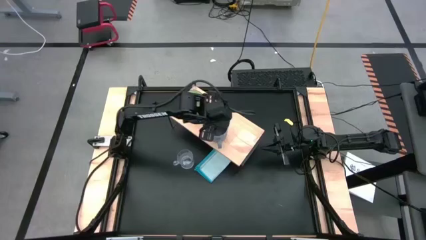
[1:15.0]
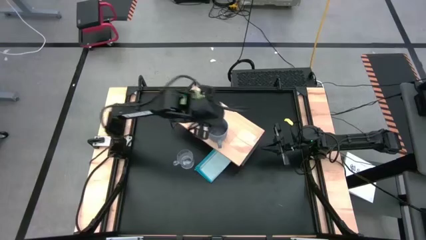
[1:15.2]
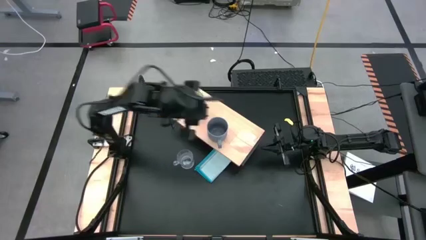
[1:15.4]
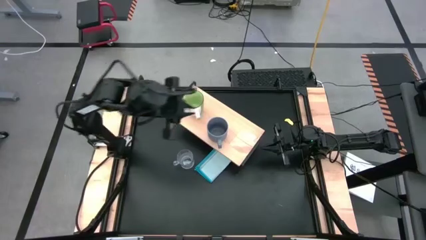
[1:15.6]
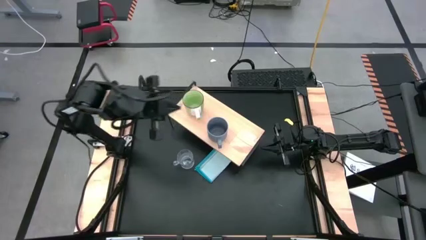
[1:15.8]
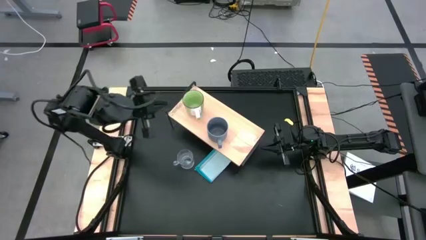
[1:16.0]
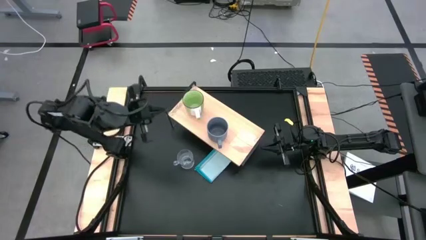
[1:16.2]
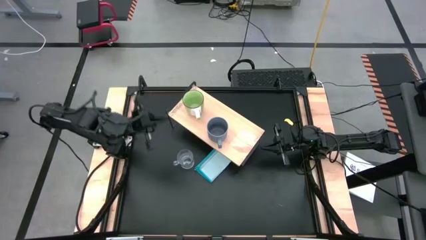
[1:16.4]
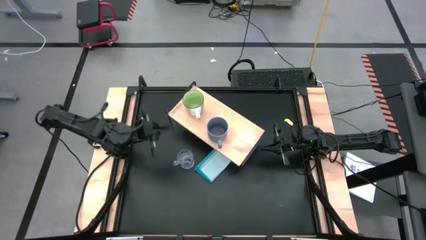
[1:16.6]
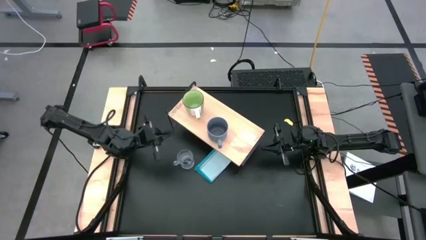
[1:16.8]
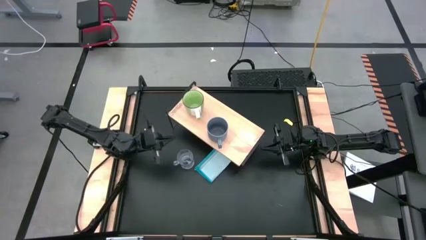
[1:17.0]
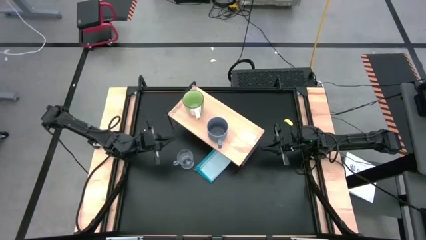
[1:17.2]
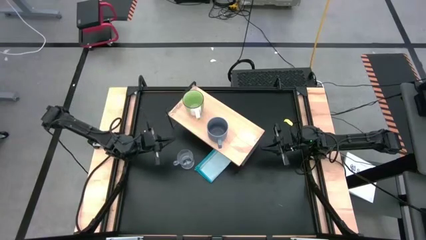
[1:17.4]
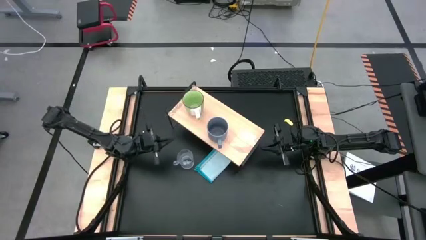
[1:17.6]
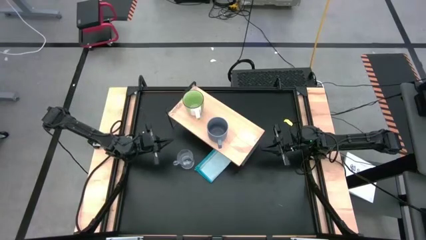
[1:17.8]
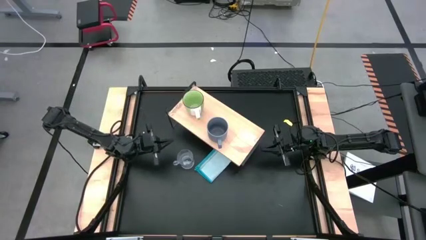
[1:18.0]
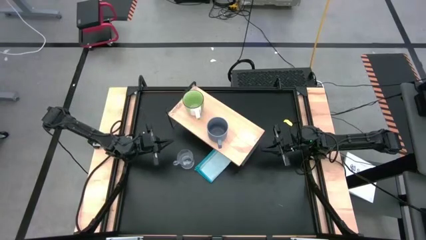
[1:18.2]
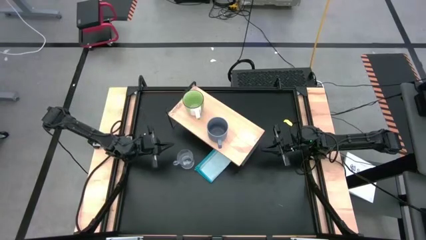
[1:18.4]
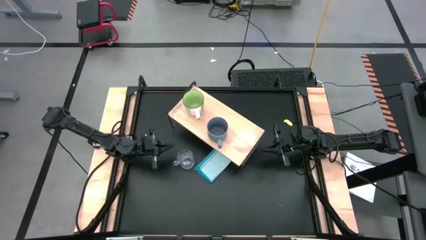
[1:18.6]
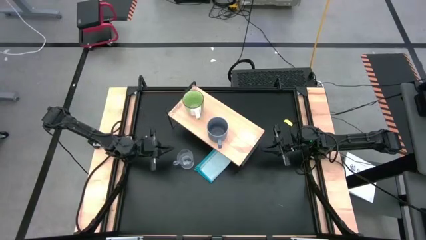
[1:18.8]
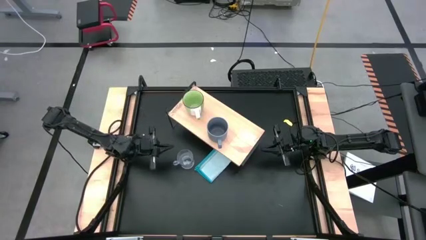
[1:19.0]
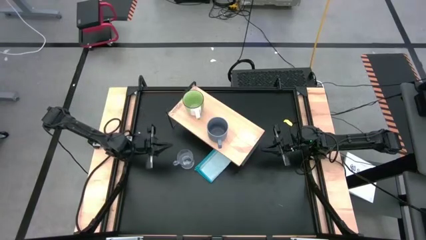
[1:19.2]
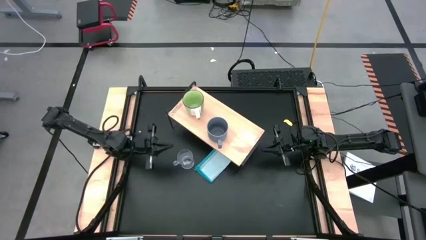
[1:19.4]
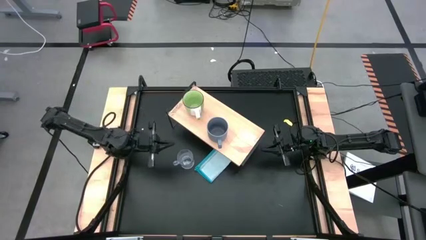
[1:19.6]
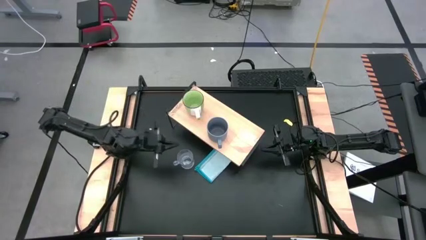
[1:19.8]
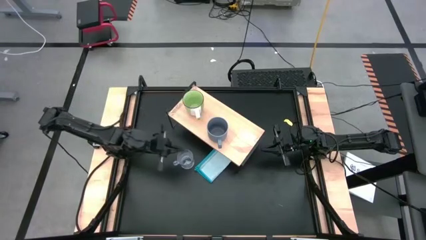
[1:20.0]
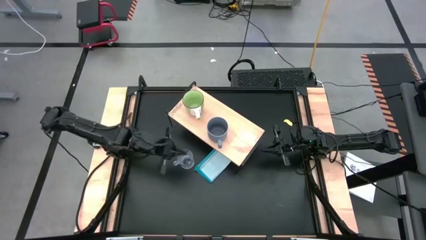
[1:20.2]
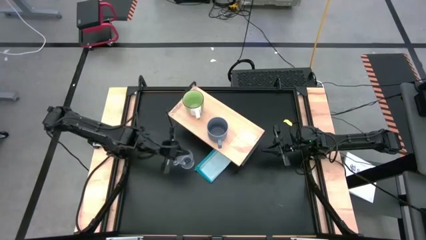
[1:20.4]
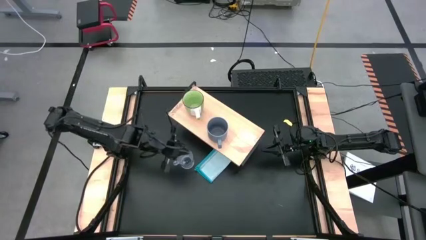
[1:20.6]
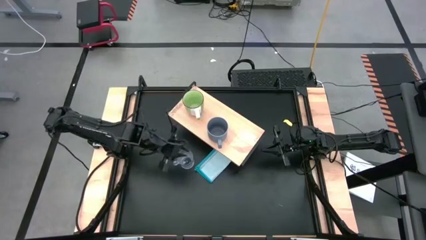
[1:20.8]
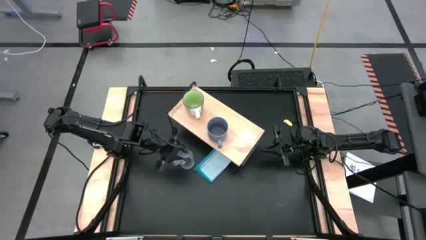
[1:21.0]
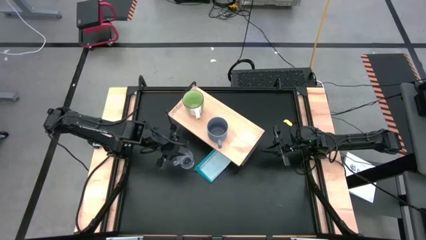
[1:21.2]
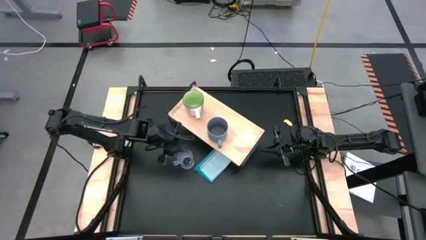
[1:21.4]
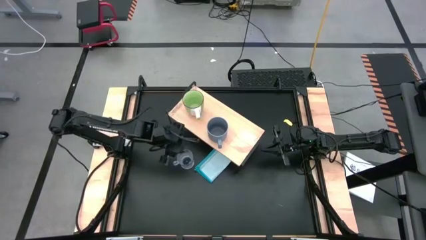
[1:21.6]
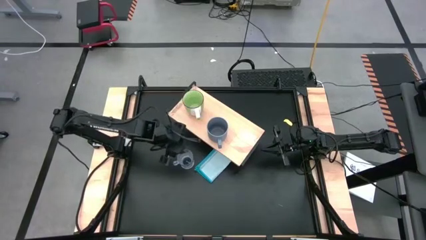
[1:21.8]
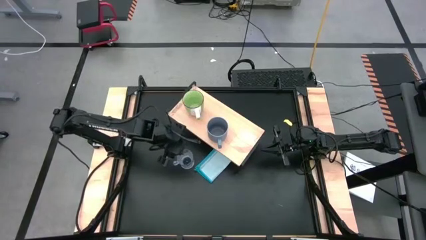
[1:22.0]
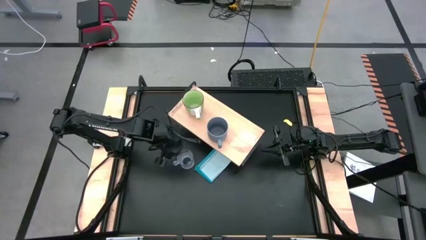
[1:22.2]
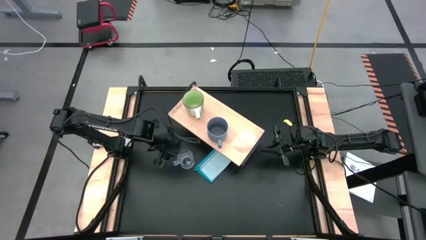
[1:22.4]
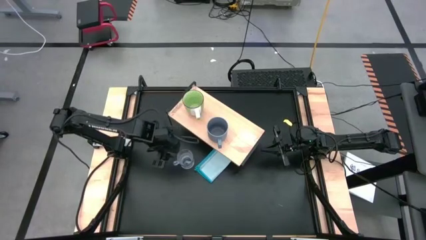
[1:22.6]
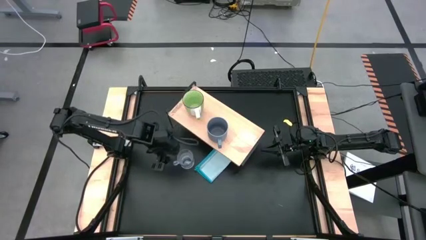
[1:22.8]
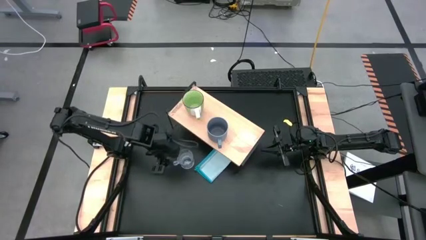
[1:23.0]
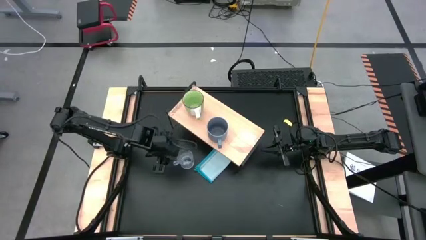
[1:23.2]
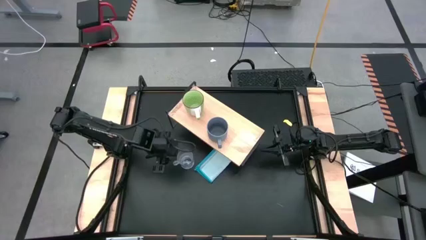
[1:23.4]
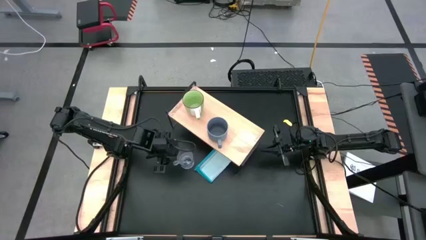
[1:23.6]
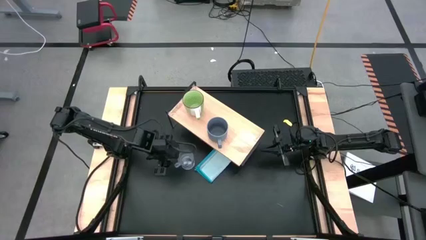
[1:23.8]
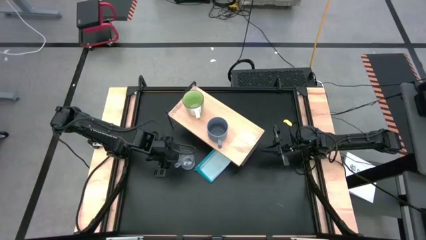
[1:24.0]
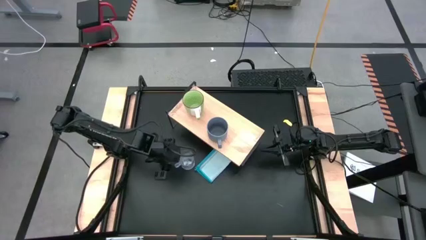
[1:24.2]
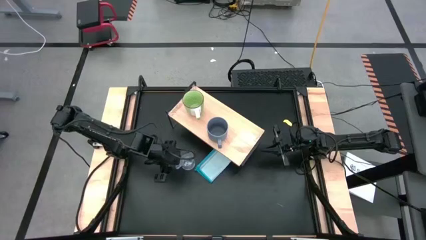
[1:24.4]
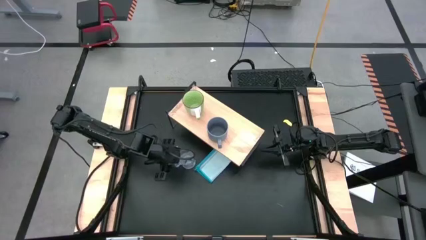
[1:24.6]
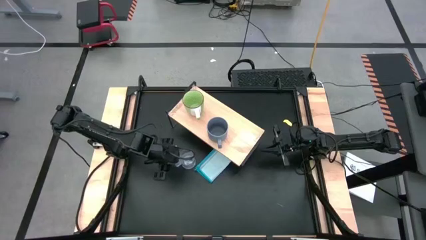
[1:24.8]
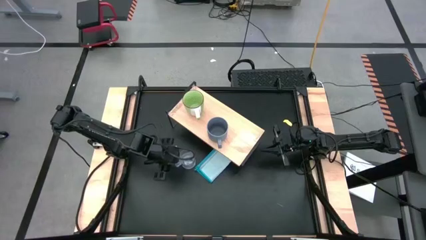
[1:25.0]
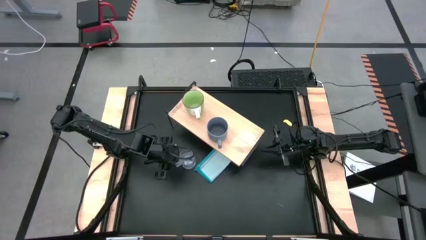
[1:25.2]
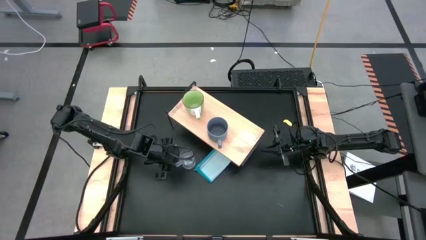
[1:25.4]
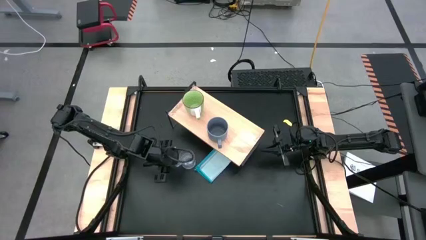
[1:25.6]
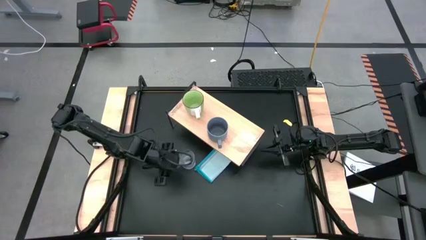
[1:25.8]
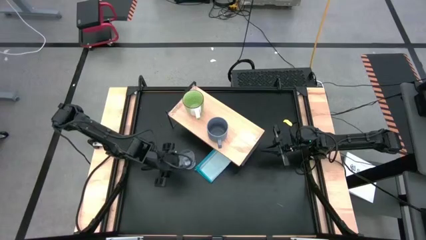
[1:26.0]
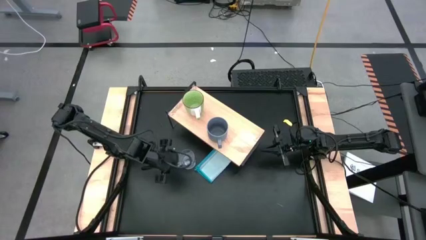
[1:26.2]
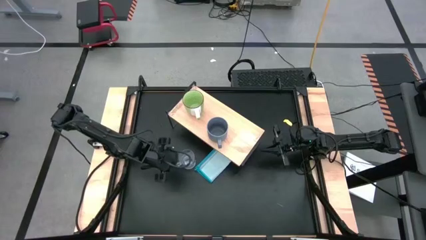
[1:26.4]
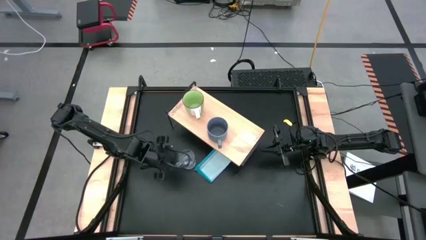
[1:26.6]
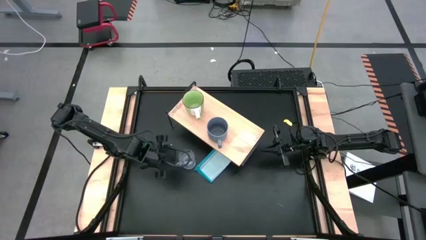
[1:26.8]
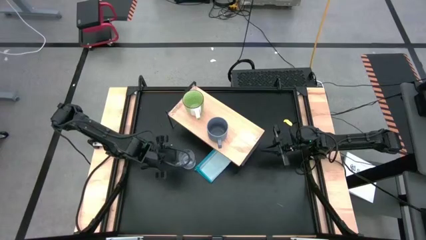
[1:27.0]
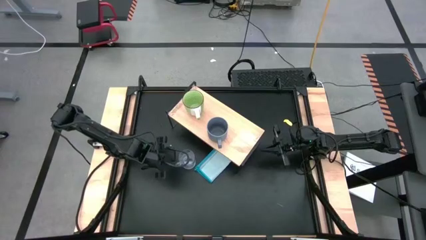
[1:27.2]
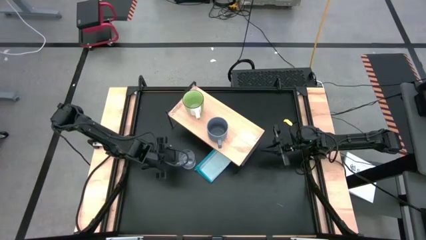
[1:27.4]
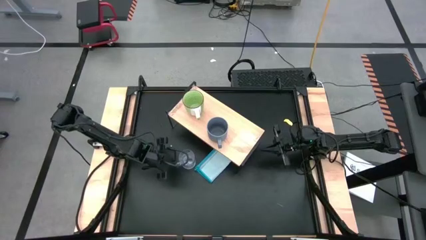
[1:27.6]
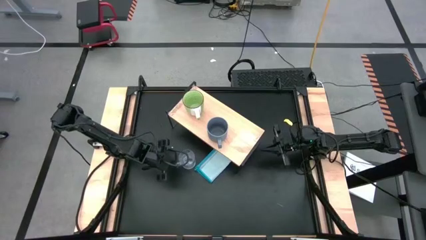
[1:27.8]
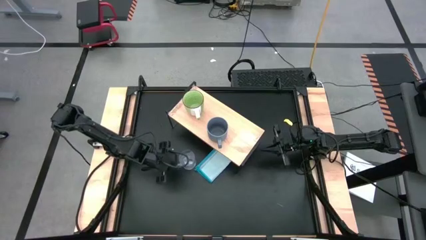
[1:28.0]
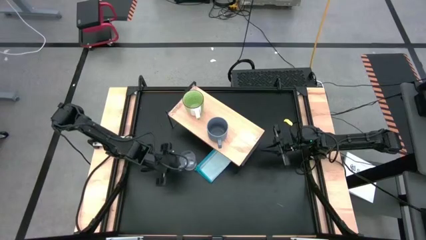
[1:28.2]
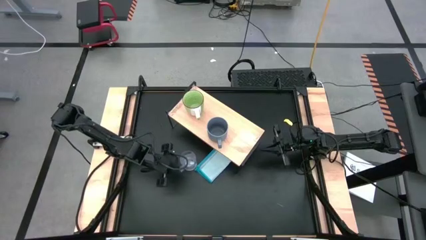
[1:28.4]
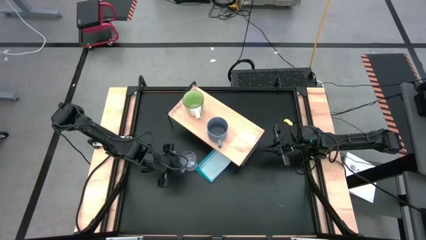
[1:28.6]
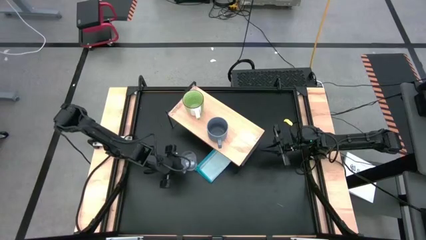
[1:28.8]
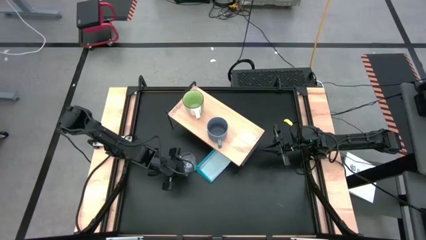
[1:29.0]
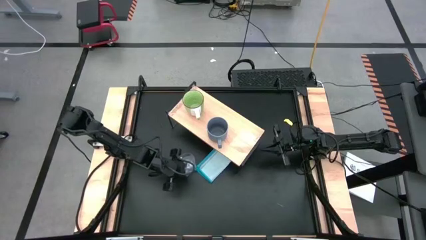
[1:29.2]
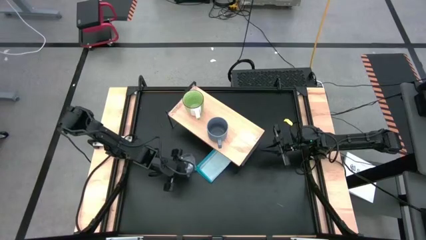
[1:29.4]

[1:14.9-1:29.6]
Task: Stack small to large cups/mugs on shelf
Put the transparent mug on the shelf

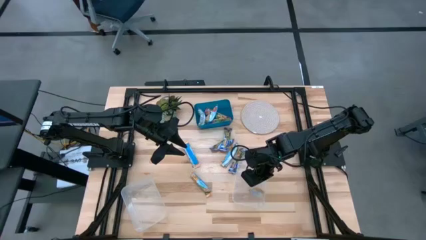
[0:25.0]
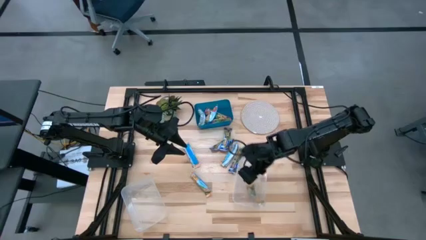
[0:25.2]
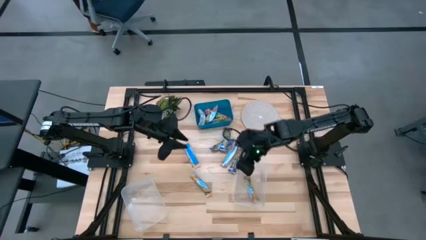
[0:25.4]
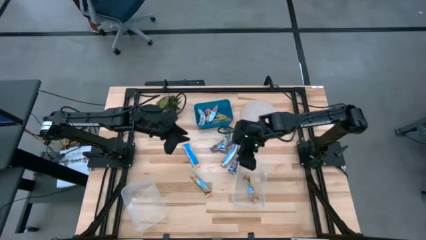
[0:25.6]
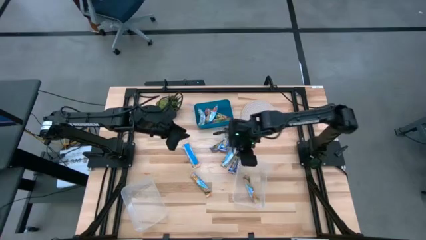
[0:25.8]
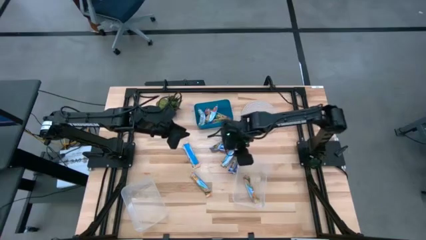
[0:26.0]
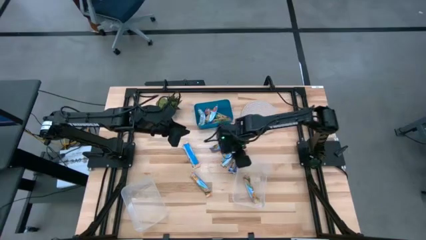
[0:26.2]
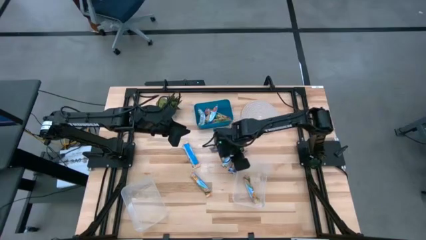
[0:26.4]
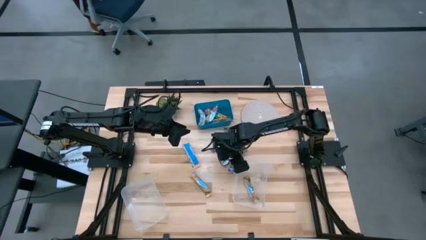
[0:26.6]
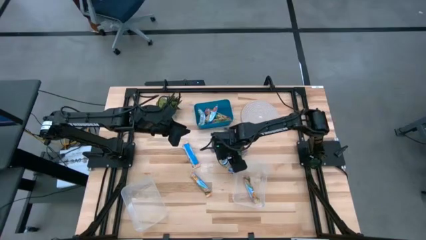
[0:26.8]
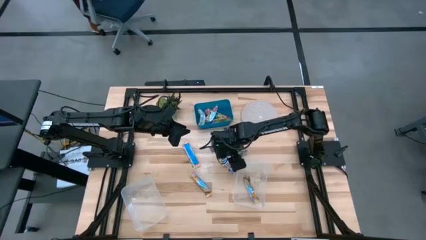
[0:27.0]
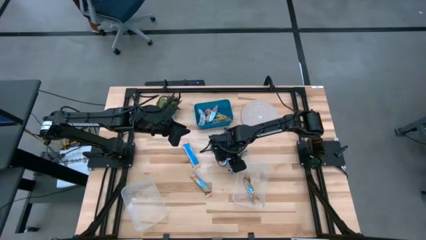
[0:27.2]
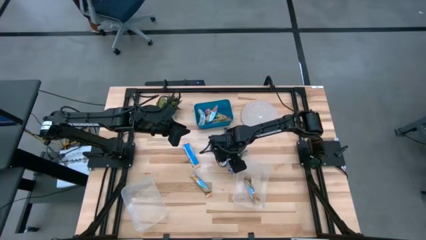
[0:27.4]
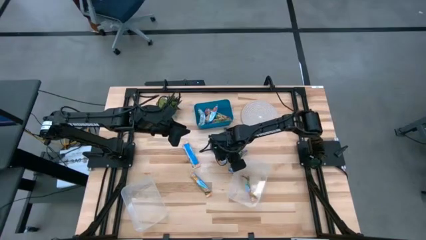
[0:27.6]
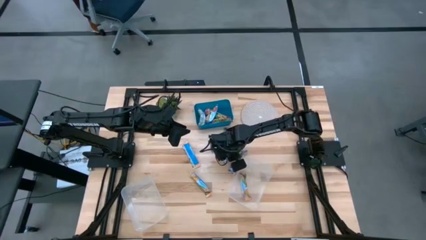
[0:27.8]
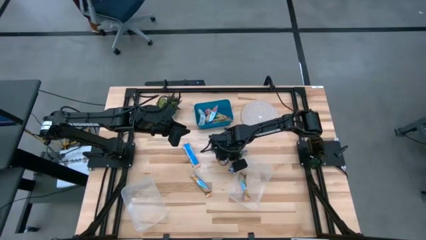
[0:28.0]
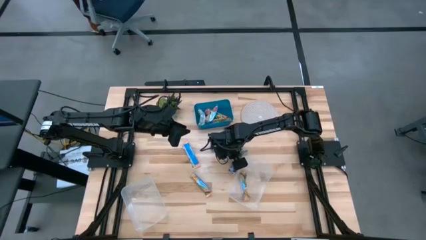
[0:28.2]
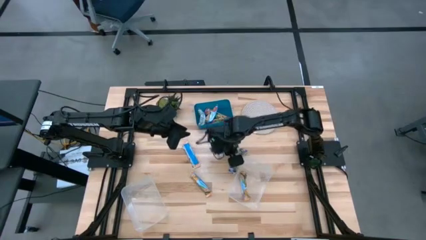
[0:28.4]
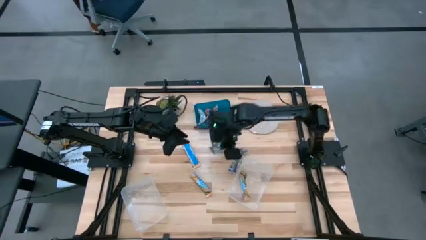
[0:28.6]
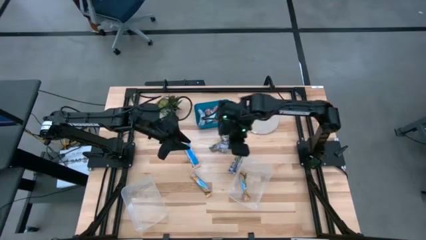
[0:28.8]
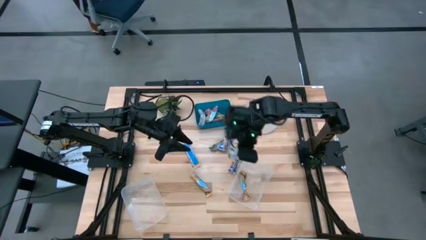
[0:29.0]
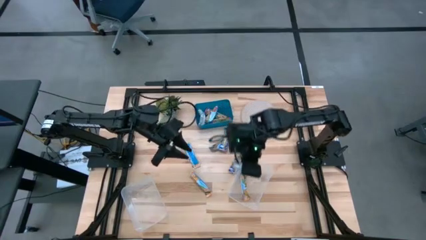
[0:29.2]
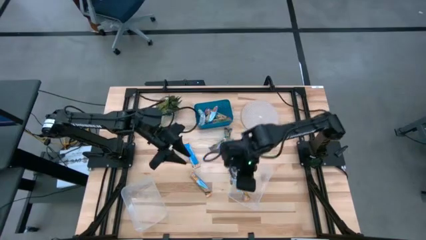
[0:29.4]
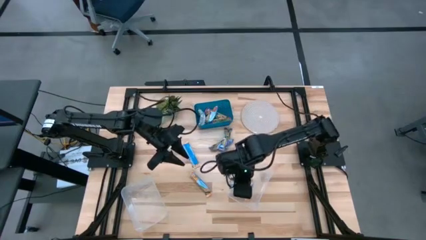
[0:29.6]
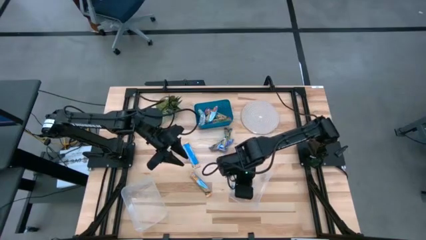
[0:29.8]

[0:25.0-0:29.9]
Task: Pick and place Granola Bars by type
Put the yellow granola bar into the right transparent bin
